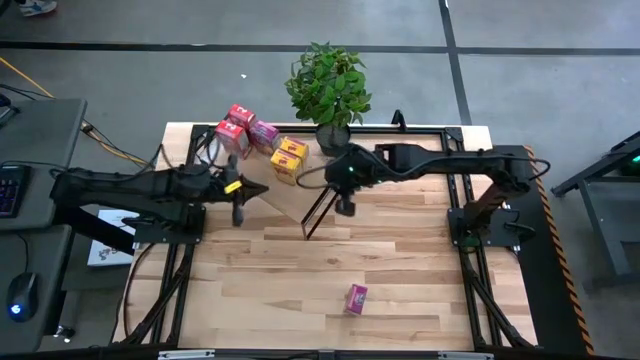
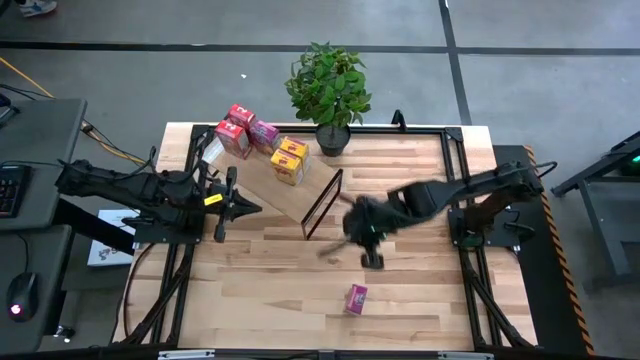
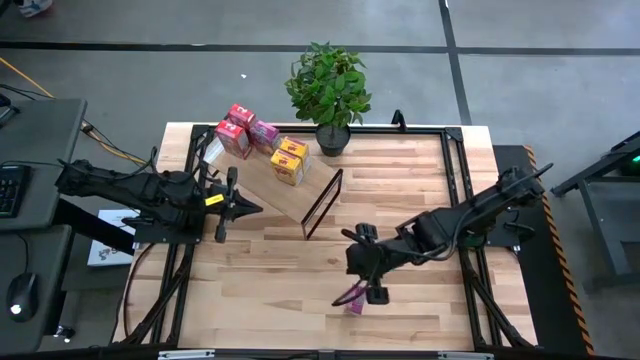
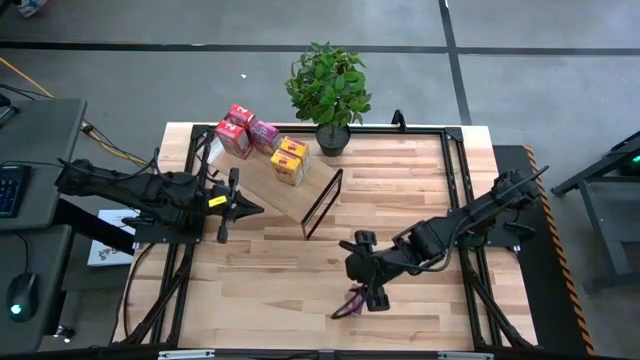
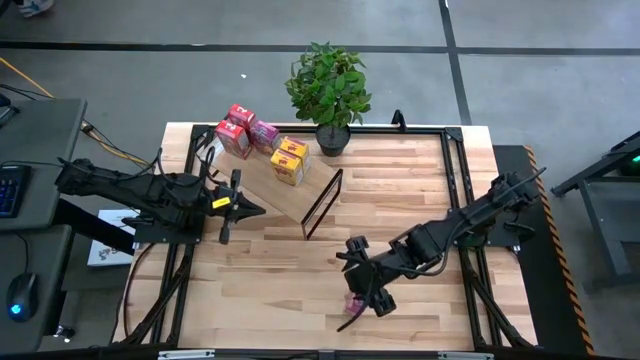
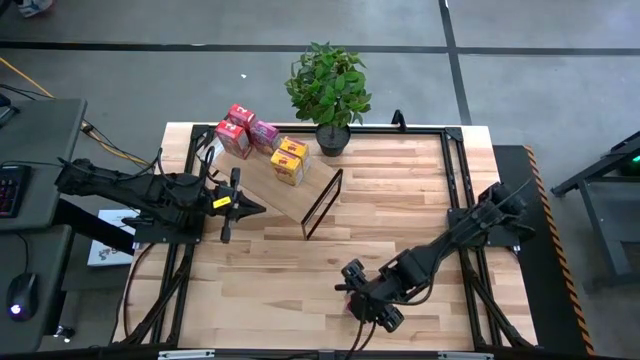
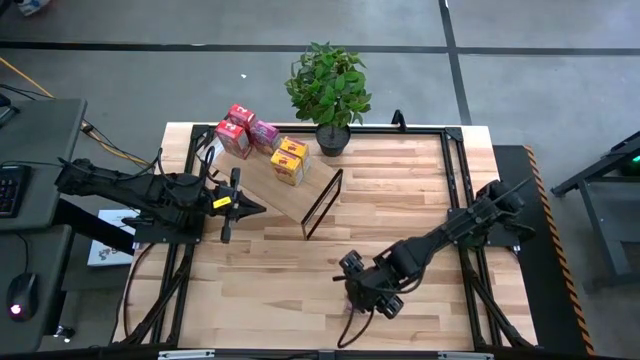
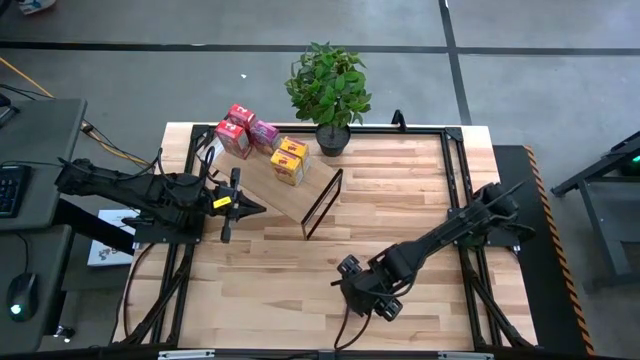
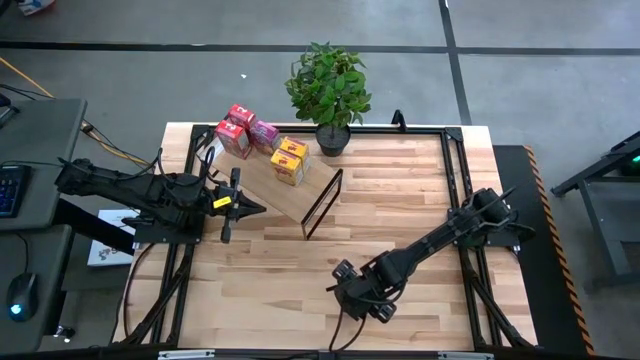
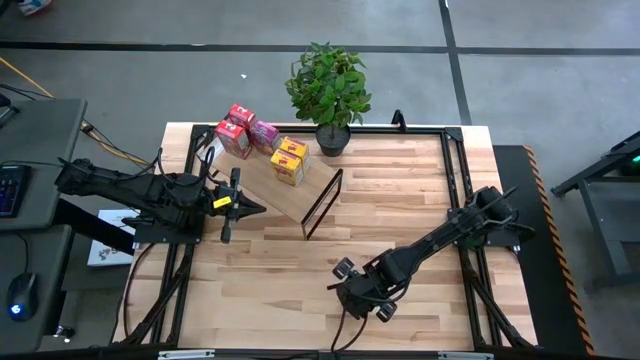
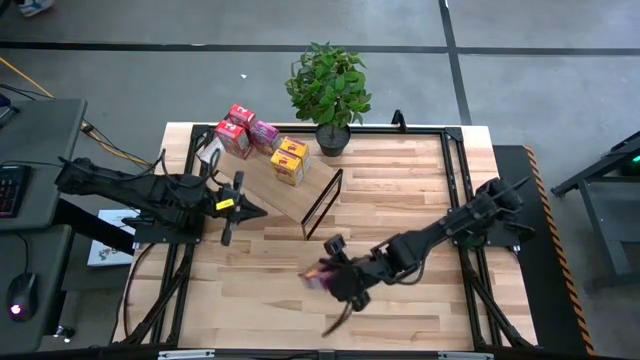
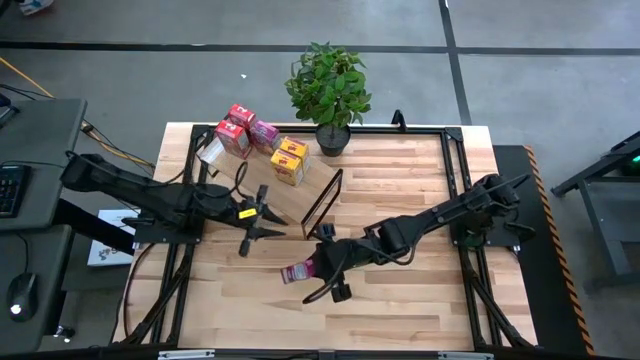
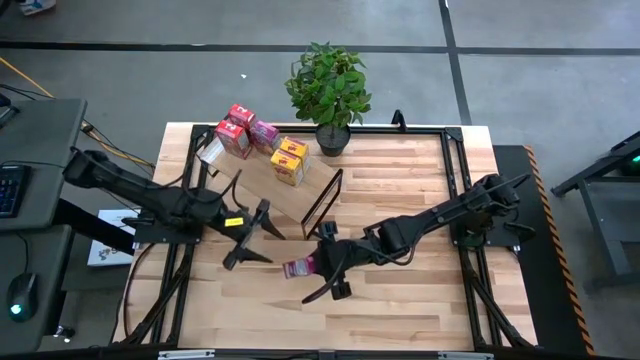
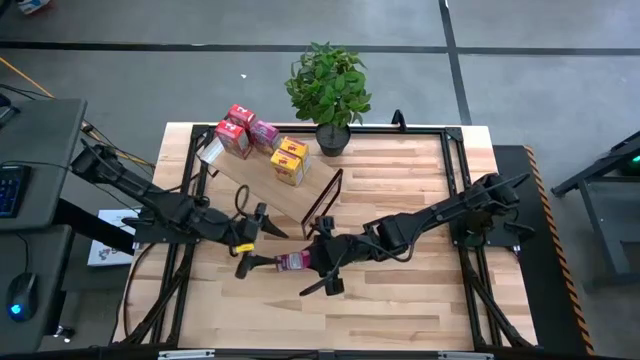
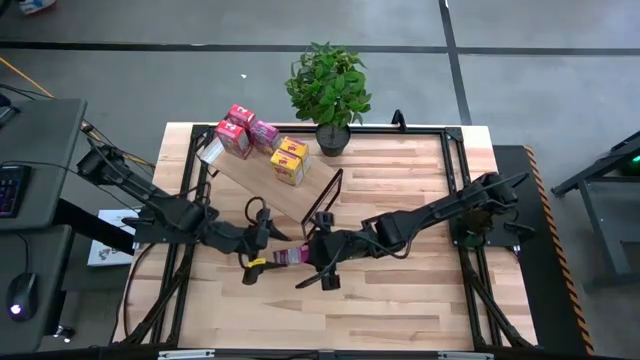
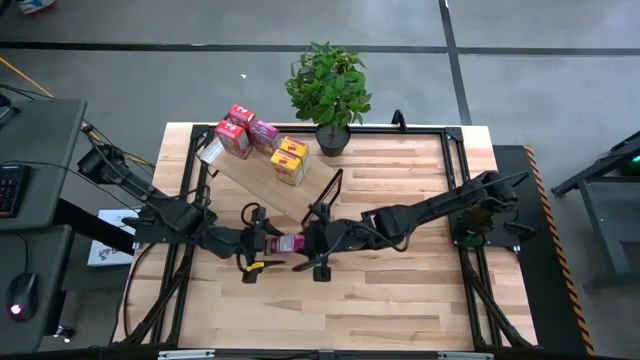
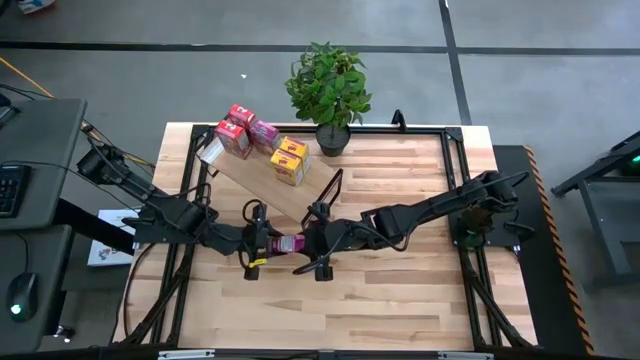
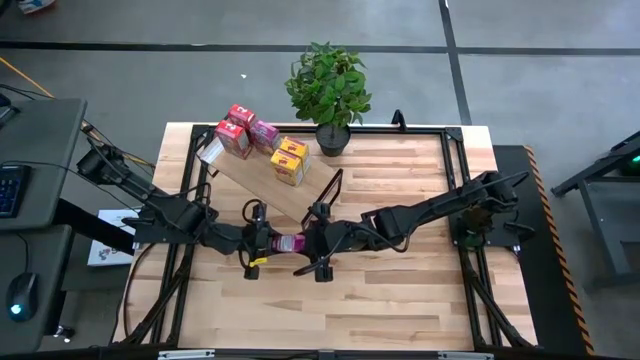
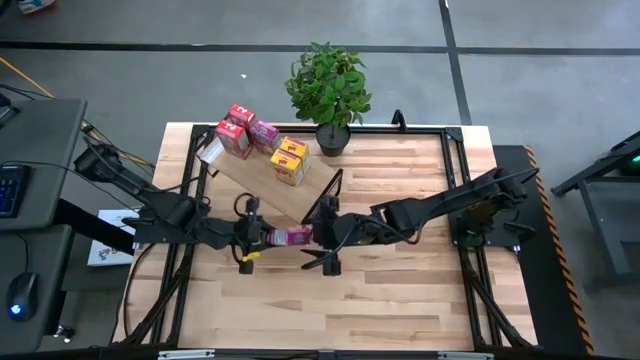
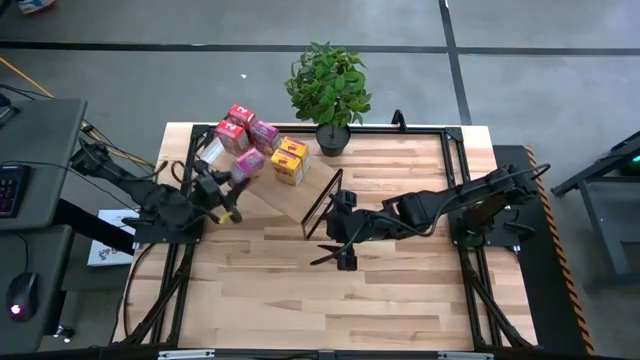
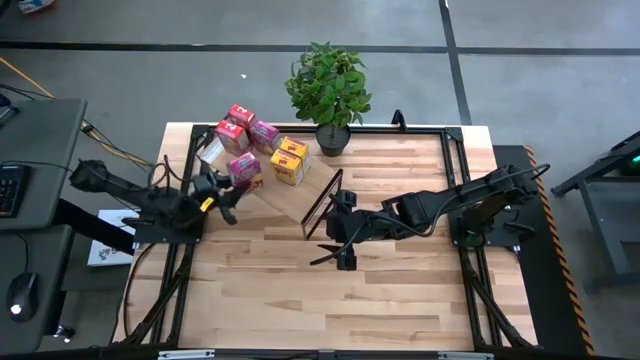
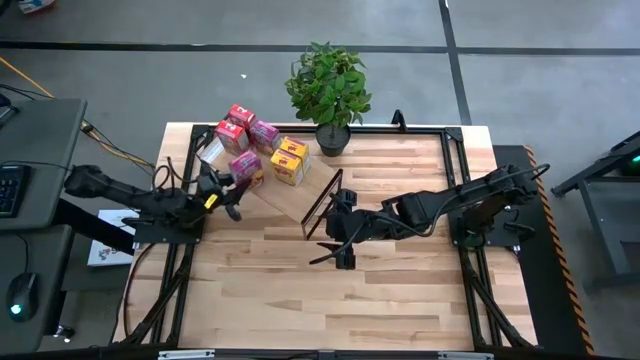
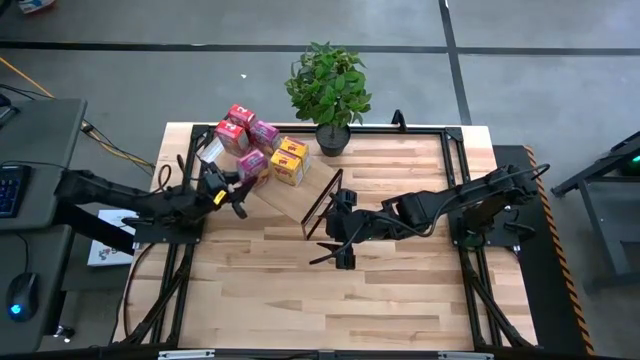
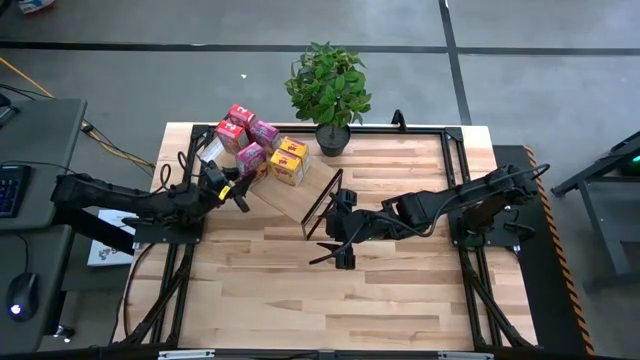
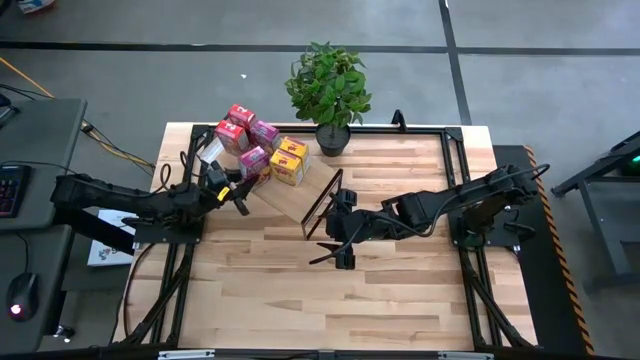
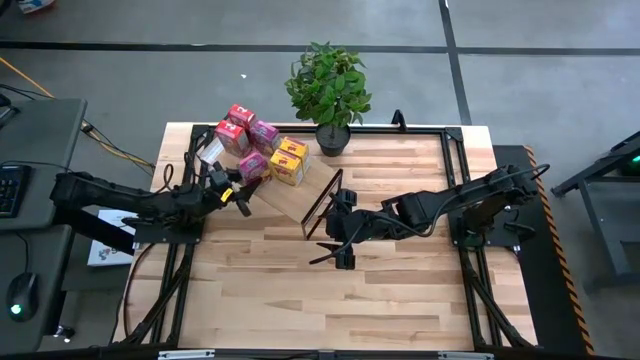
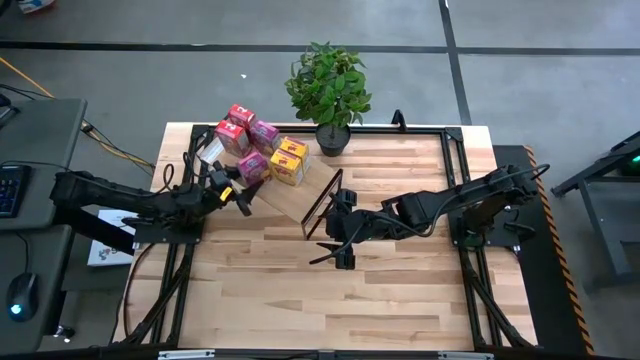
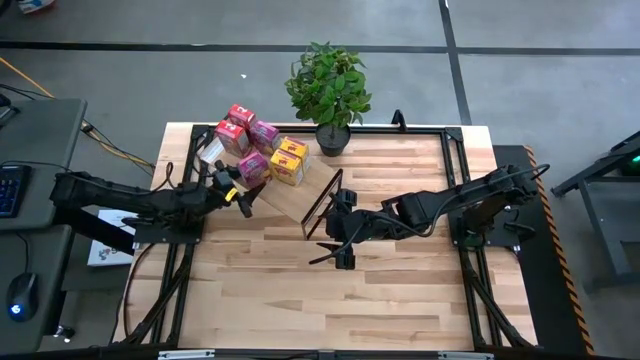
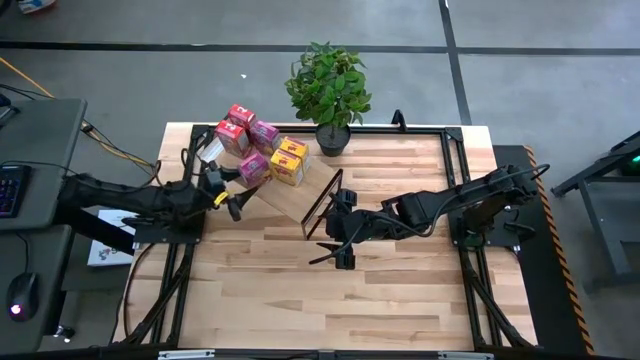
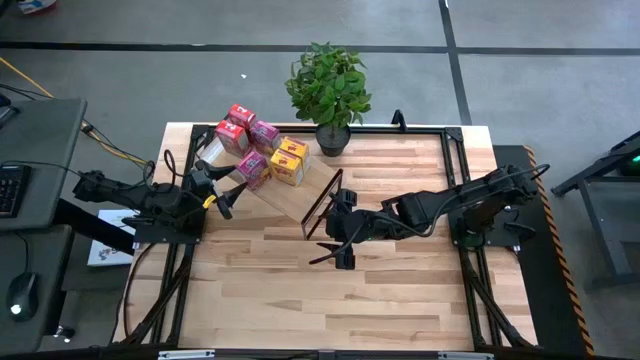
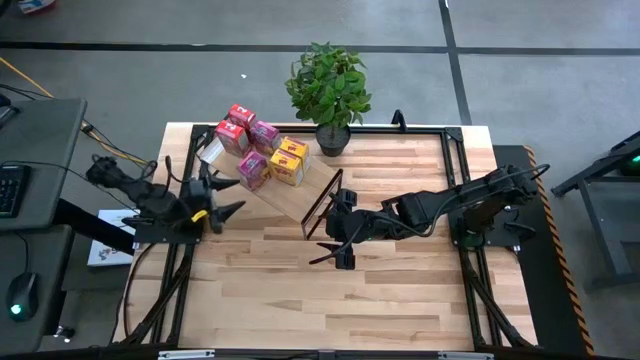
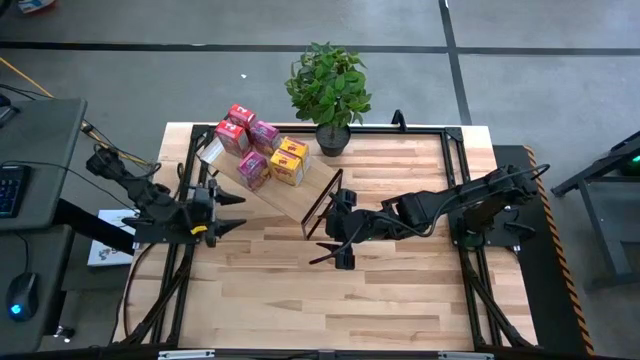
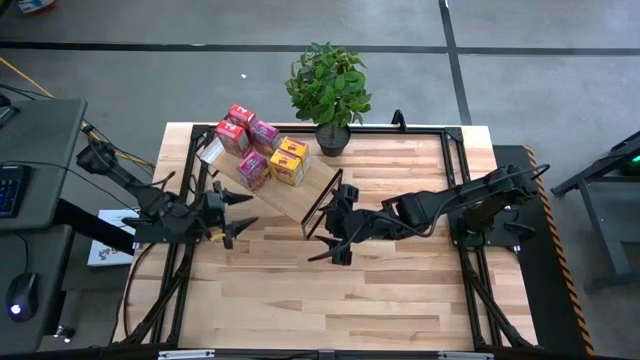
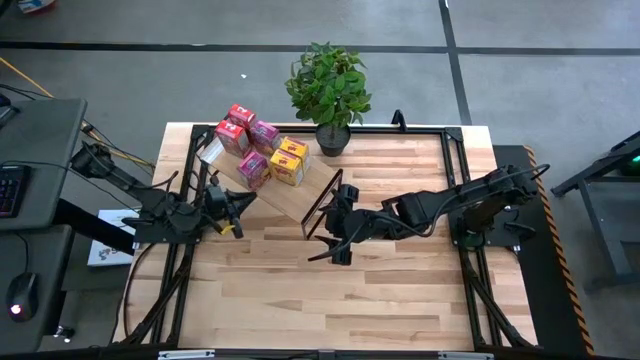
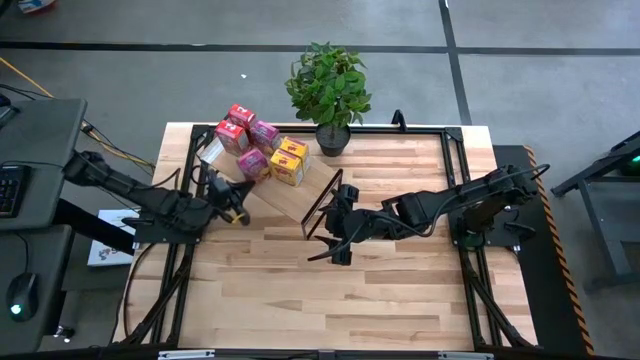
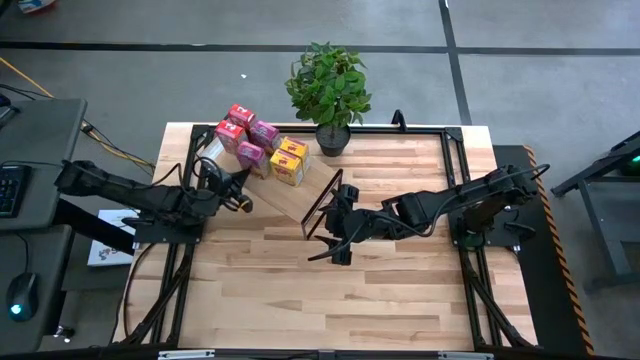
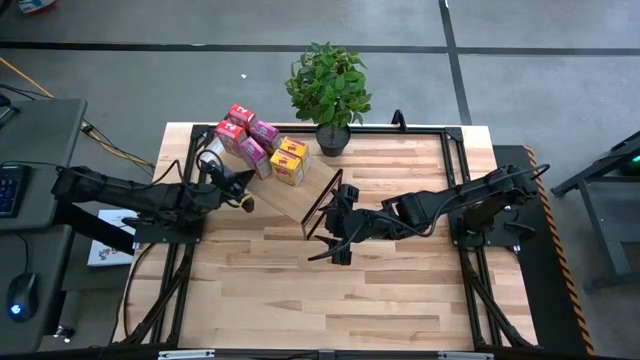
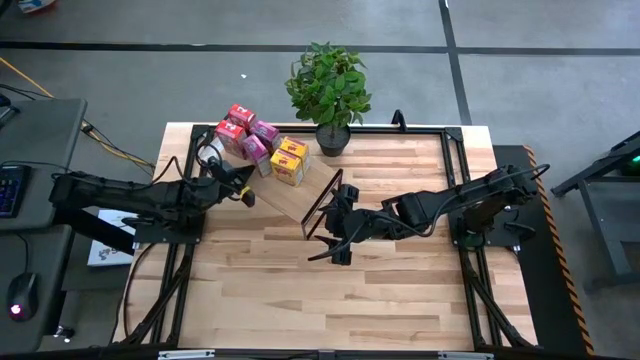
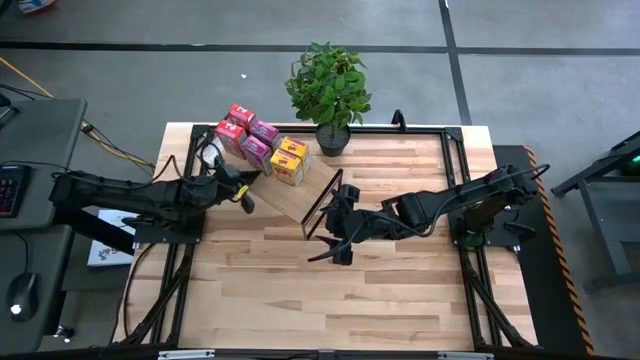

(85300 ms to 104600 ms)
Task: Stack cereal on shelf
Put the pink cereal box on the shelf aligned with the other pink cereal box
